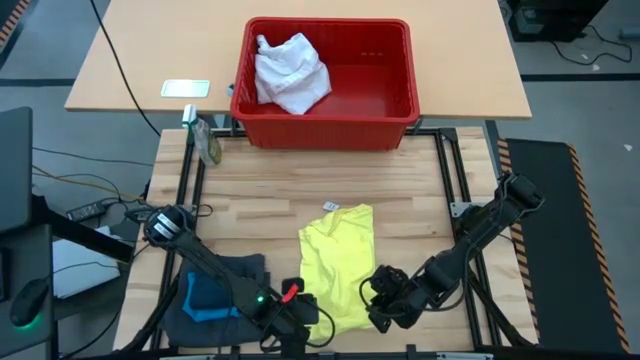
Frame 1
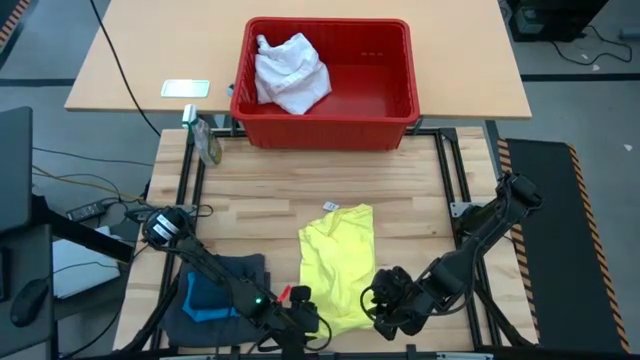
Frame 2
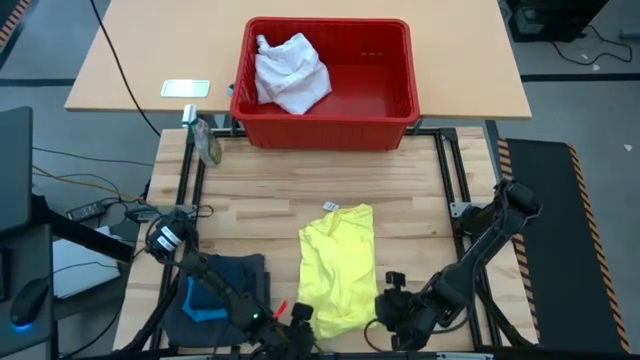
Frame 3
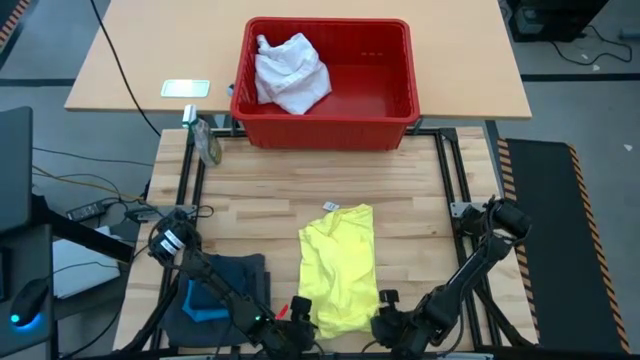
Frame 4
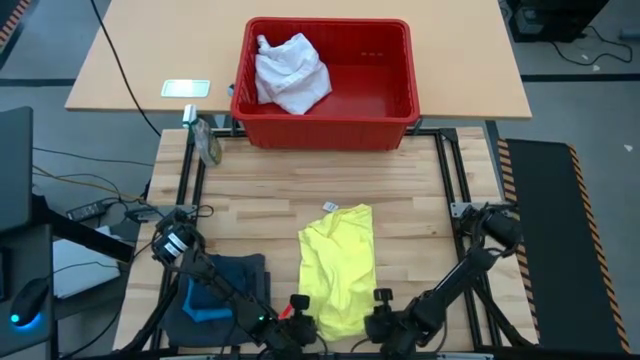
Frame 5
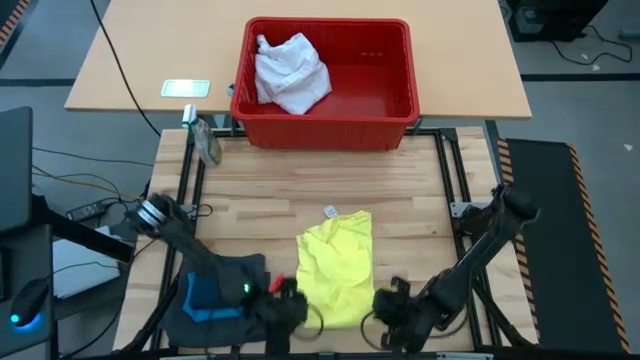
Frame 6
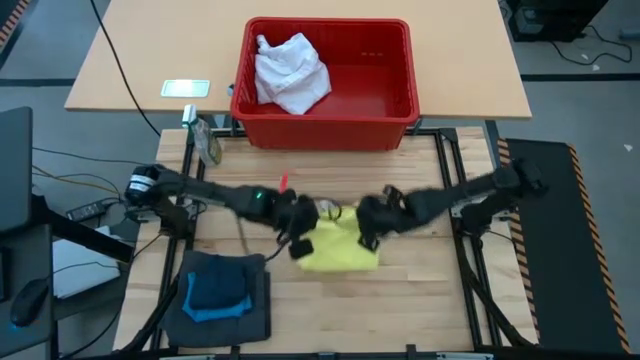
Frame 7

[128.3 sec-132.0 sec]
Task: Fold laundry
Fold the yellow shirt

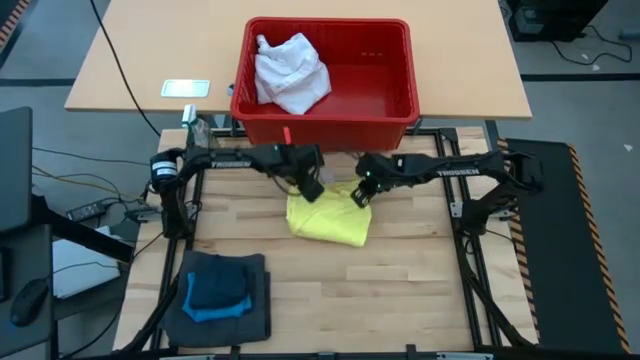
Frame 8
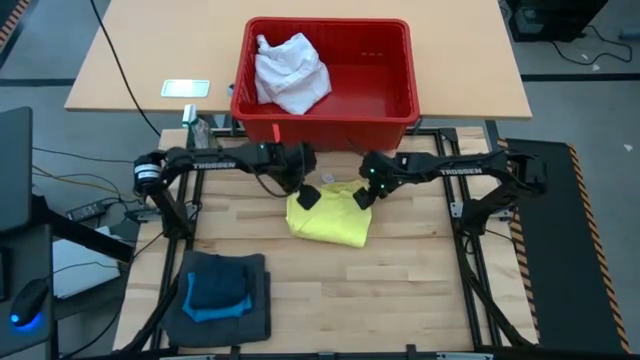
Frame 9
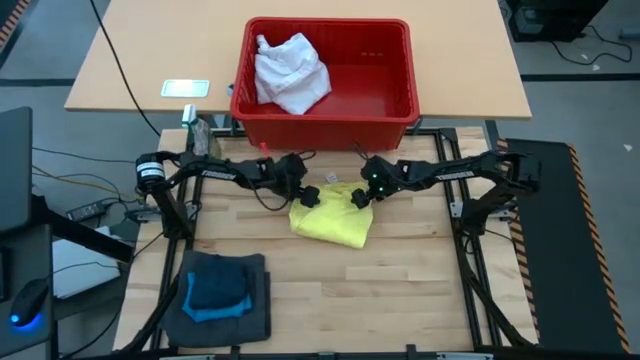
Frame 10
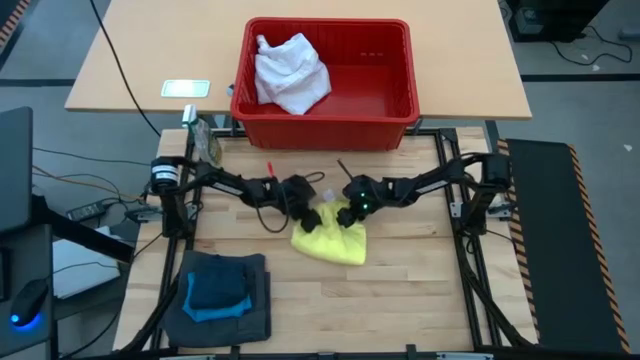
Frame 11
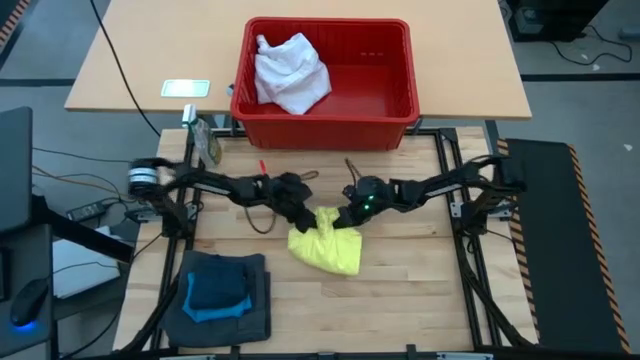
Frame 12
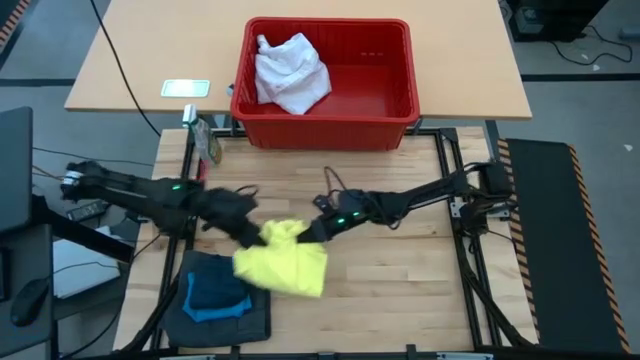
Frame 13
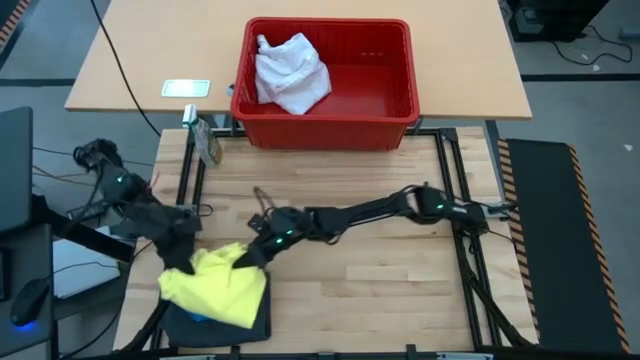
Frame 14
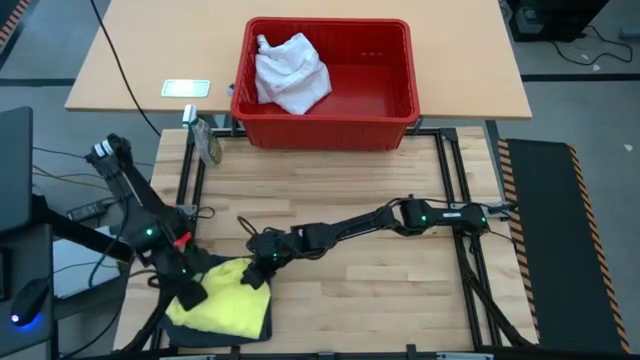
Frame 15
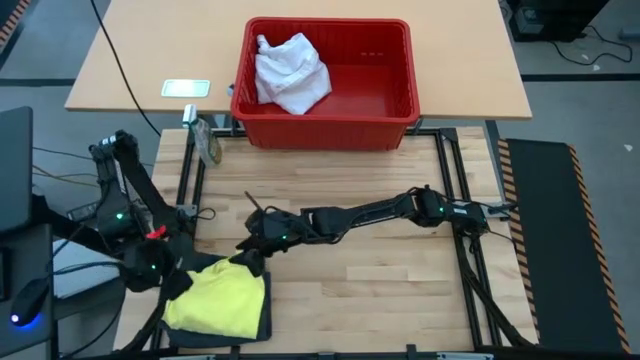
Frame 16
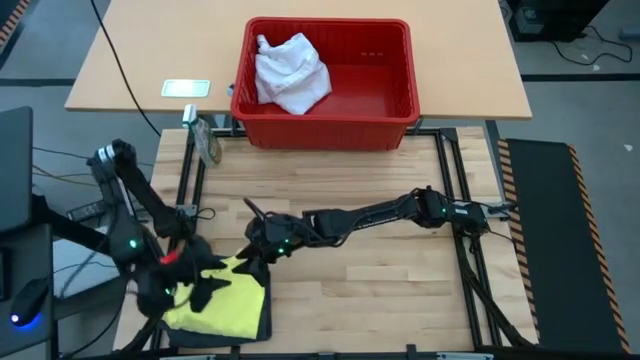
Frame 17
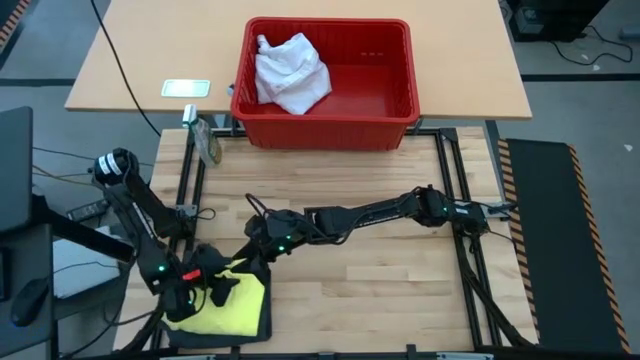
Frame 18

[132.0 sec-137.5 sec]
Stack the yellow shirt on top of the dark blue shorts

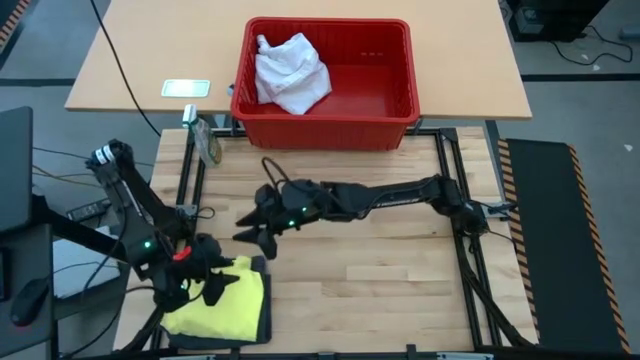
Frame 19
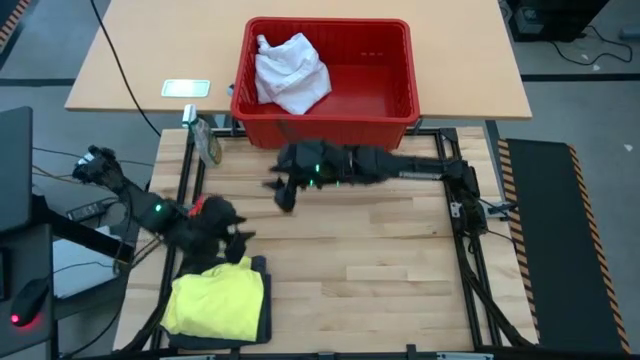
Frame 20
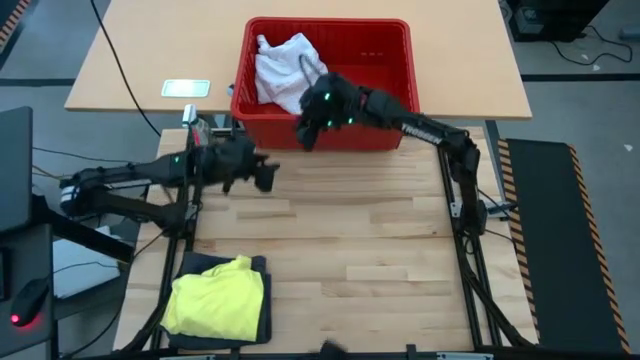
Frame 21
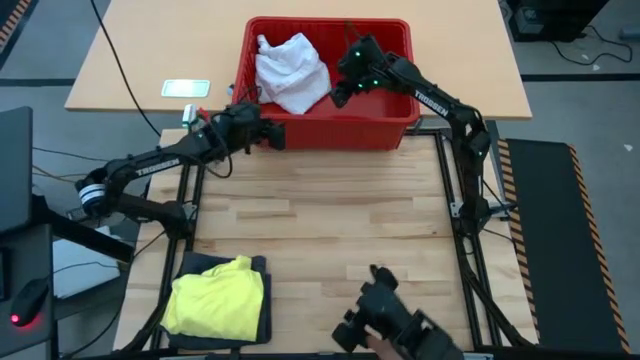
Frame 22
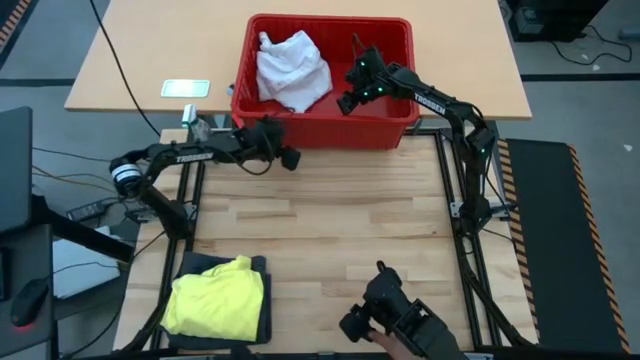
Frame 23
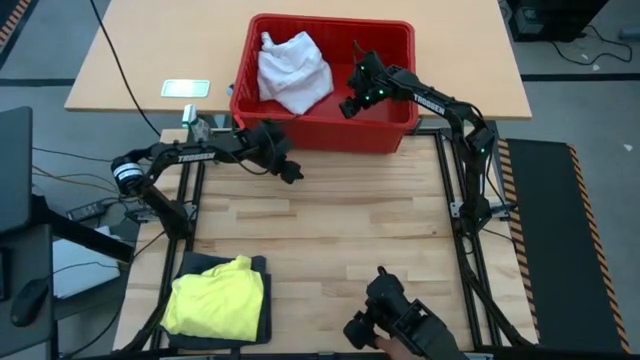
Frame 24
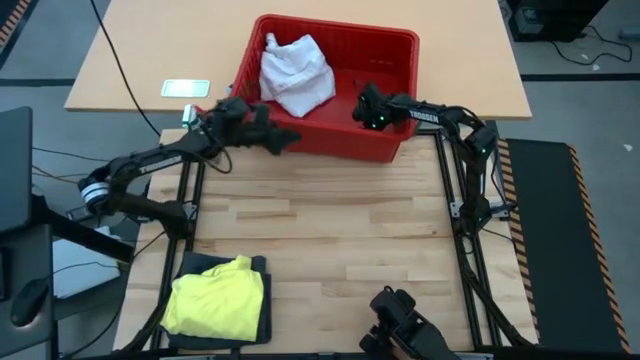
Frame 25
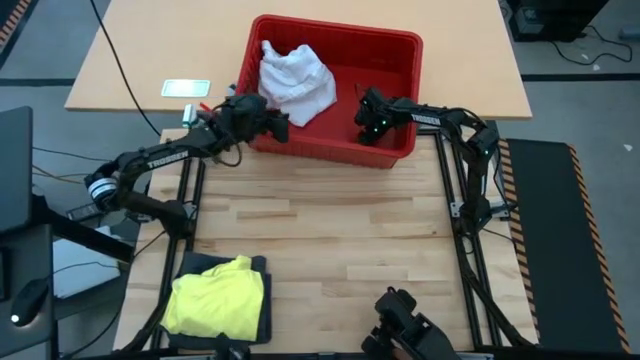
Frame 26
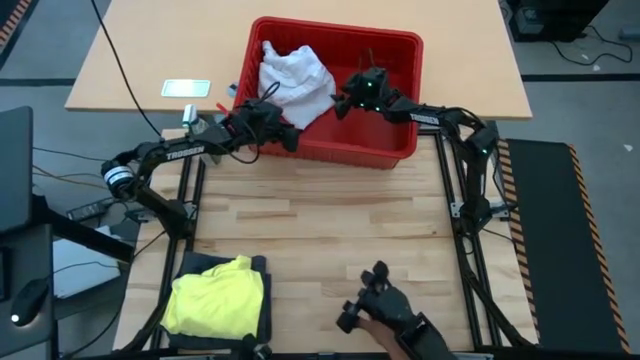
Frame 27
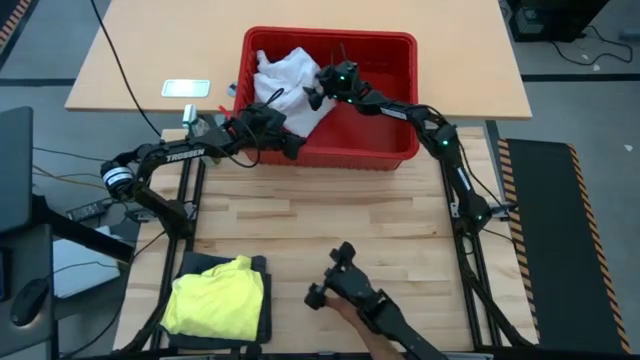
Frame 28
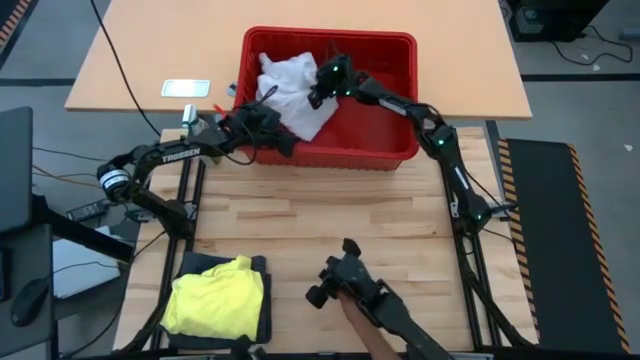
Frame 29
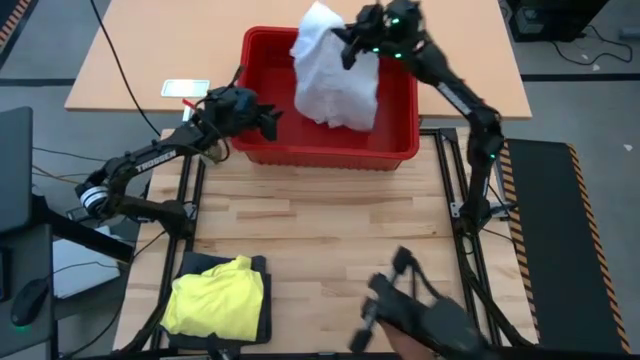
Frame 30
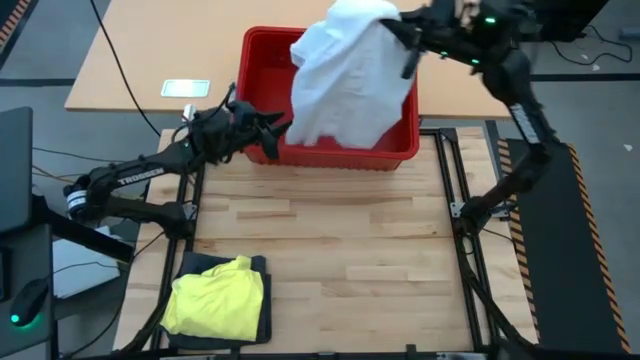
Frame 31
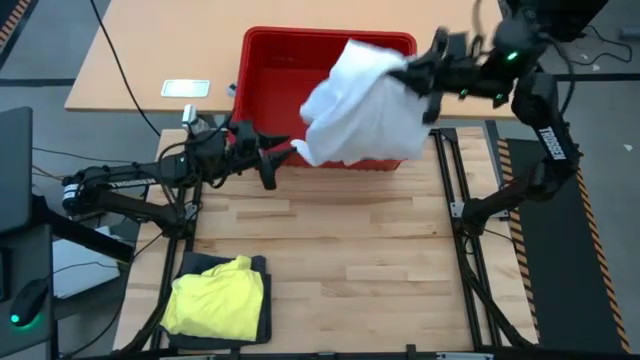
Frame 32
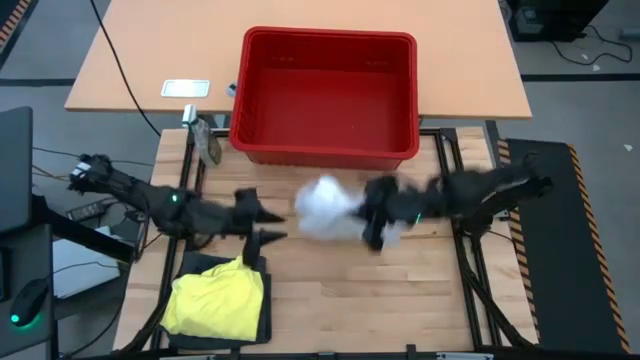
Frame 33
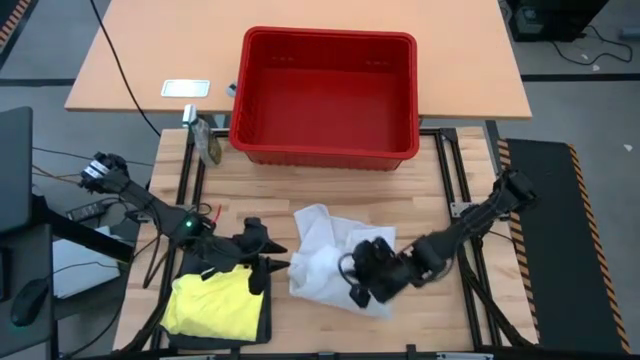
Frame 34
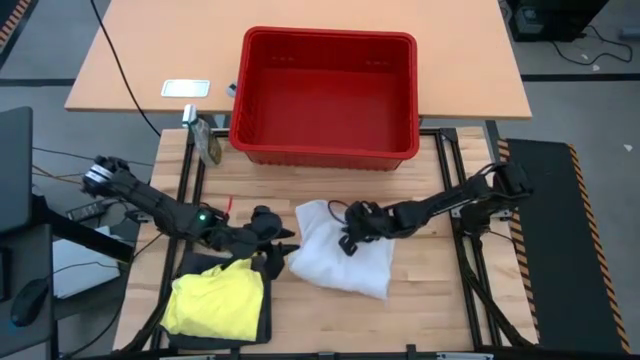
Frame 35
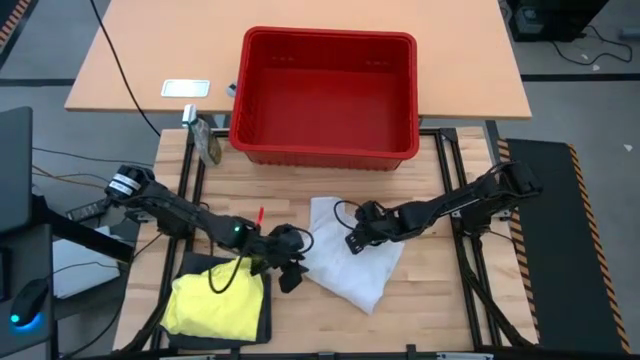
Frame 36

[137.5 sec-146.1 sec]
Remove the white polo shirt from the red bin

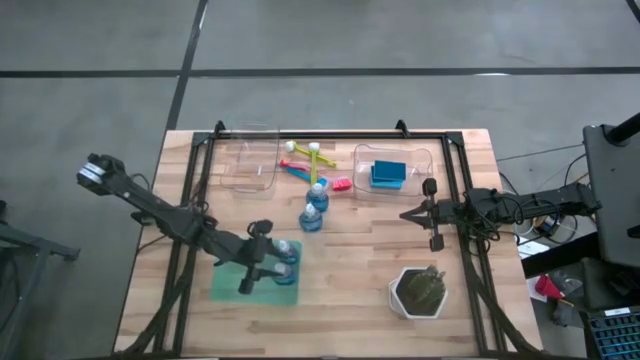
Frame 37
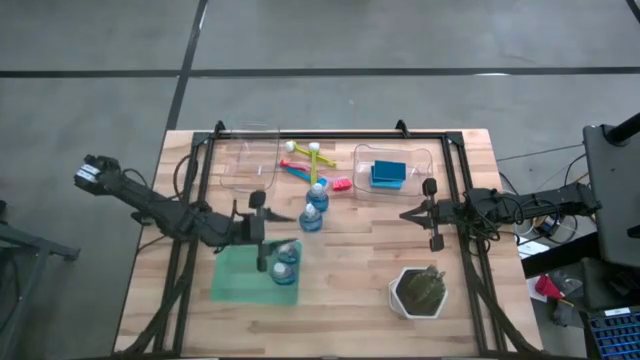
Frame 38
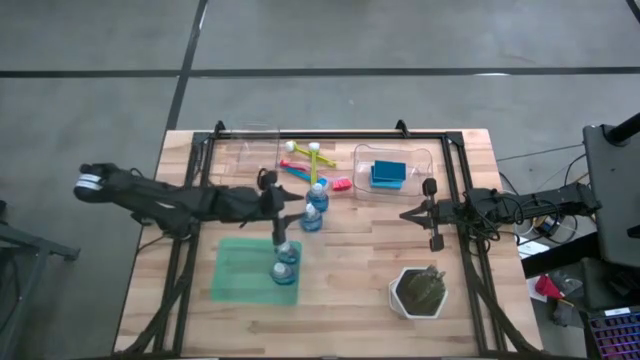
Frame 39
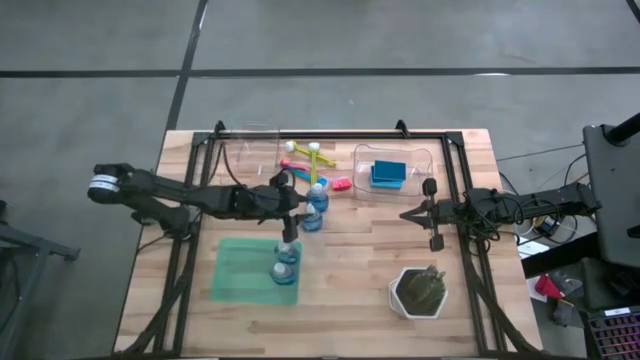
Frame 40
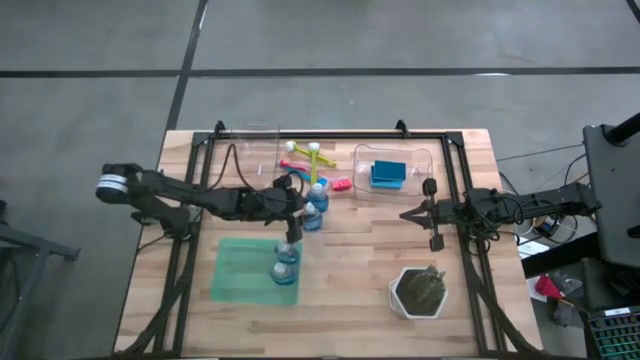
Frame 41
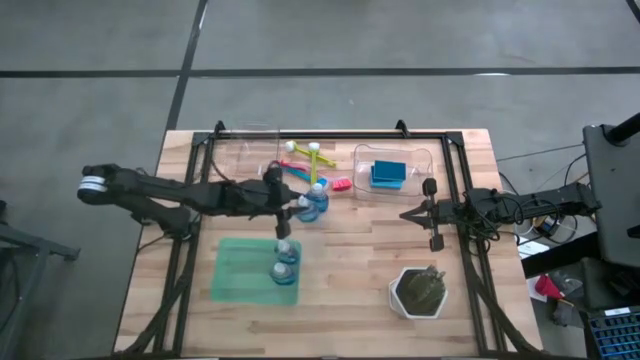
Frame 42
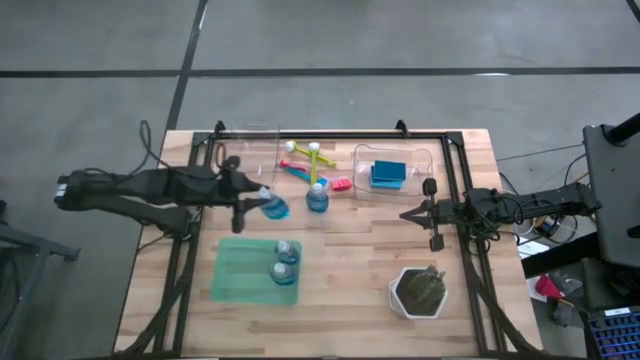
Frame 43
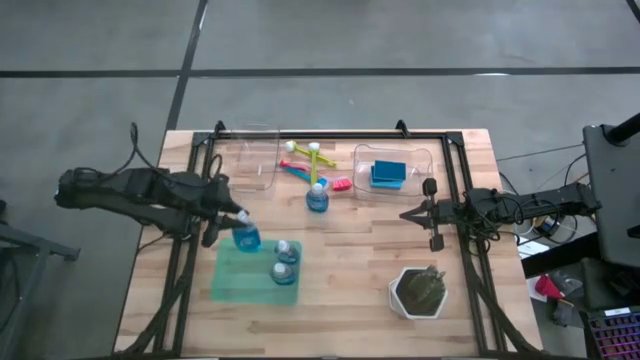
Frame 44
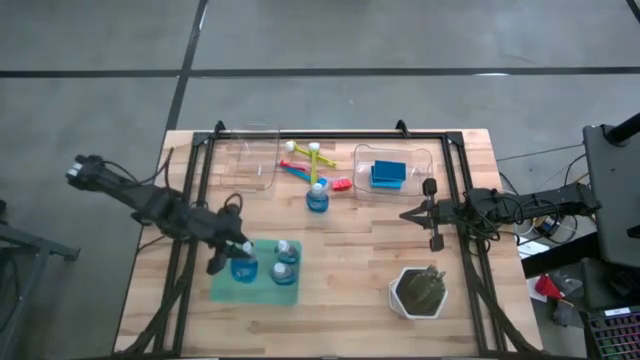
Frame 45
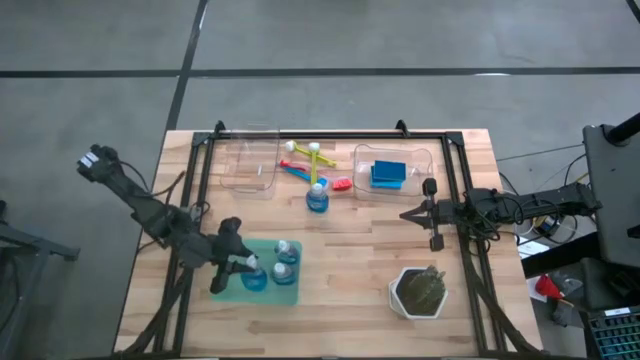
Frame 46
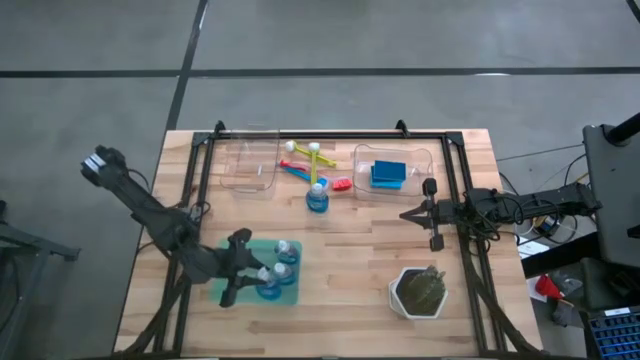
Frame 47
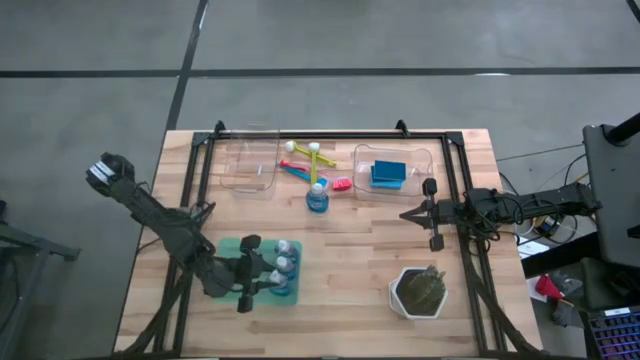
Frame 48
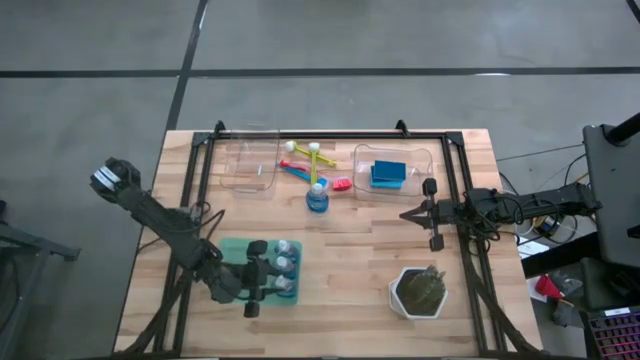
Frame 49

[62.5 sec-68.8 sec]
Task: Pick & Place Kitchen Sink Supplies
Put the blue dishwashing liquid bottle into the green bin
